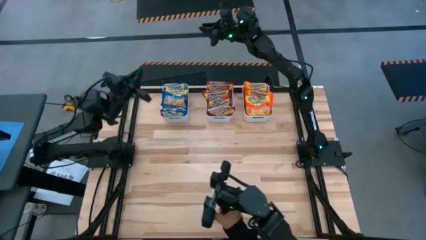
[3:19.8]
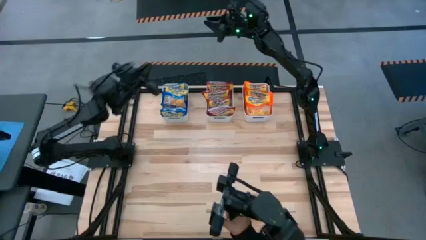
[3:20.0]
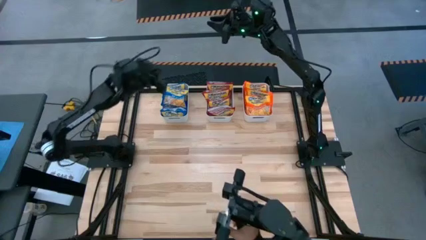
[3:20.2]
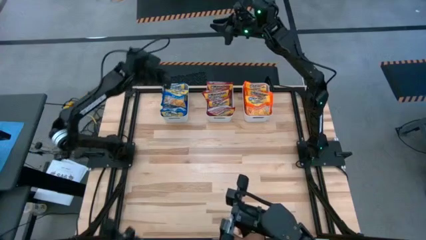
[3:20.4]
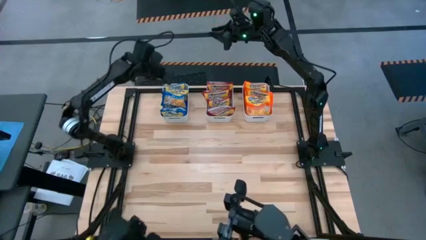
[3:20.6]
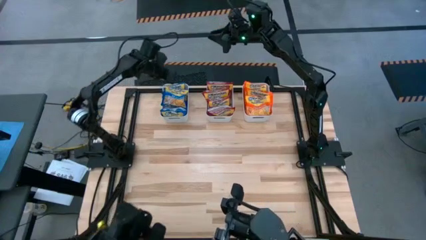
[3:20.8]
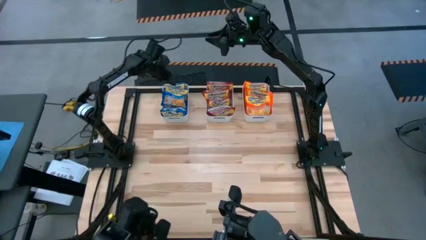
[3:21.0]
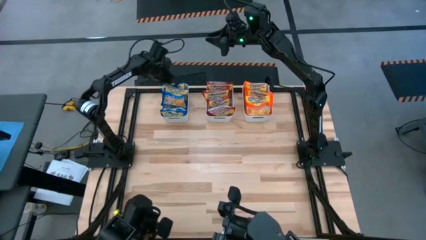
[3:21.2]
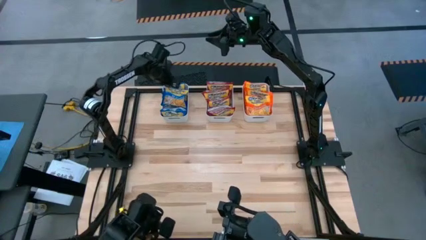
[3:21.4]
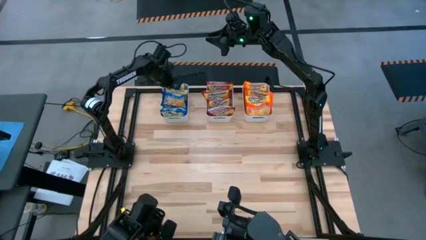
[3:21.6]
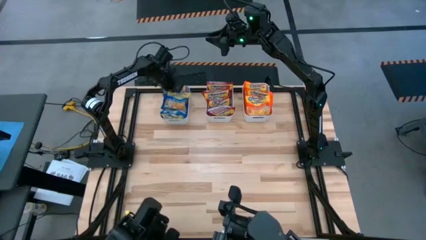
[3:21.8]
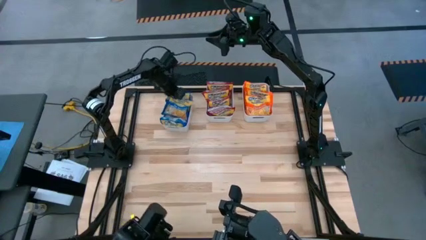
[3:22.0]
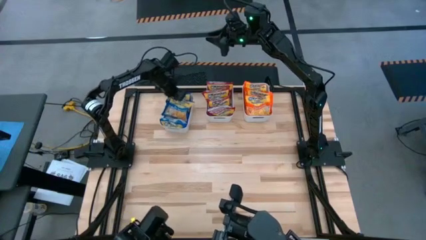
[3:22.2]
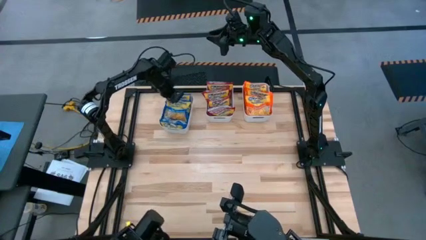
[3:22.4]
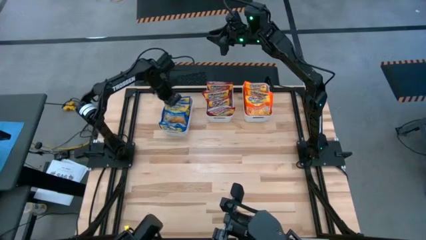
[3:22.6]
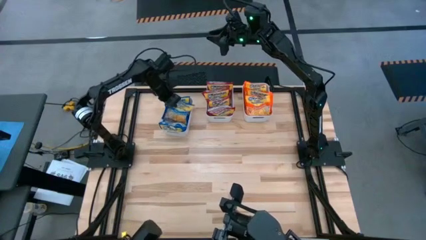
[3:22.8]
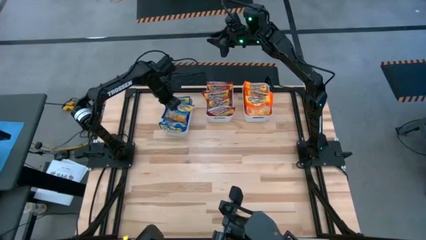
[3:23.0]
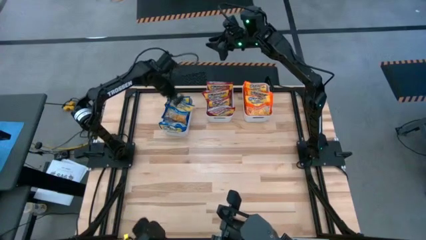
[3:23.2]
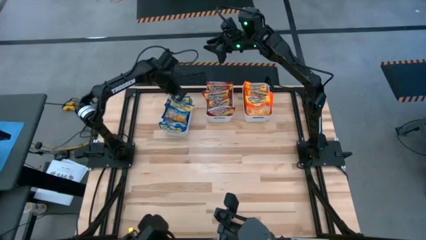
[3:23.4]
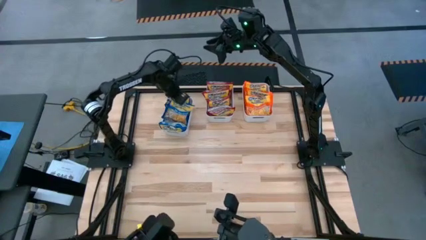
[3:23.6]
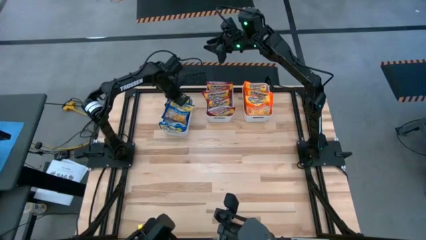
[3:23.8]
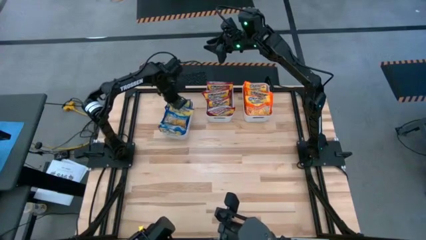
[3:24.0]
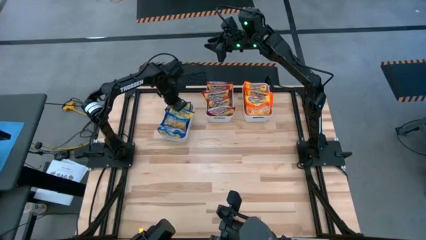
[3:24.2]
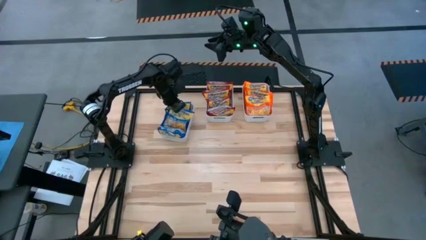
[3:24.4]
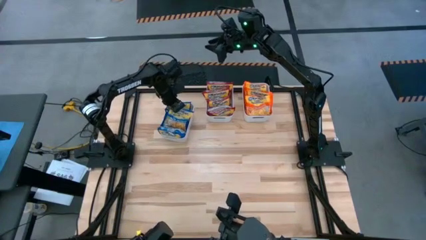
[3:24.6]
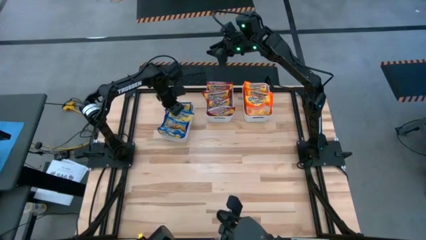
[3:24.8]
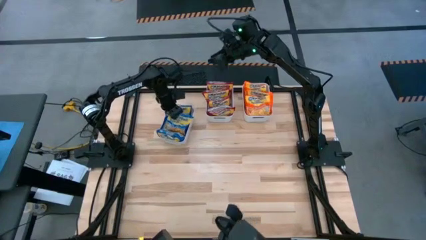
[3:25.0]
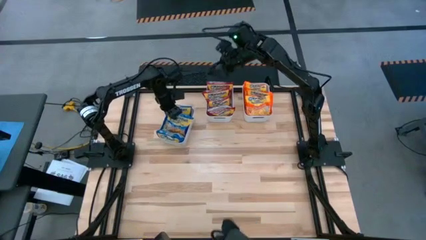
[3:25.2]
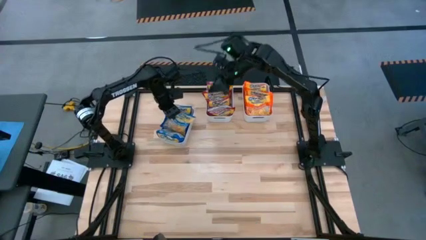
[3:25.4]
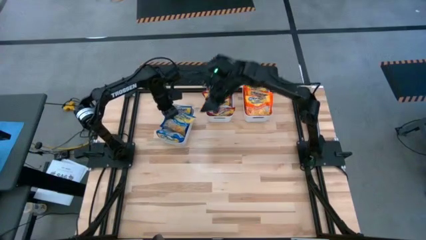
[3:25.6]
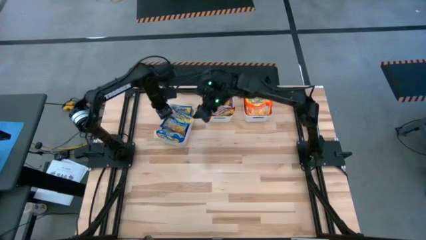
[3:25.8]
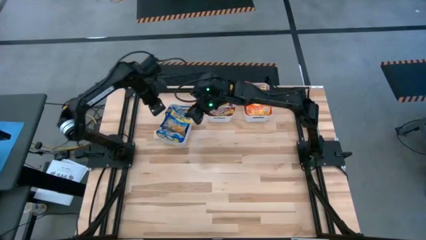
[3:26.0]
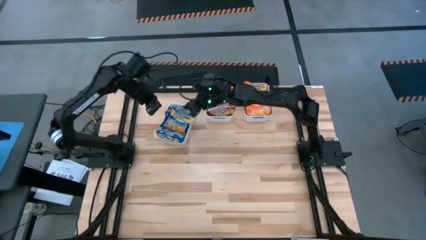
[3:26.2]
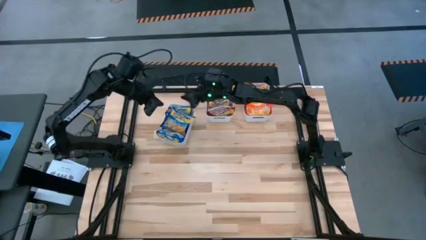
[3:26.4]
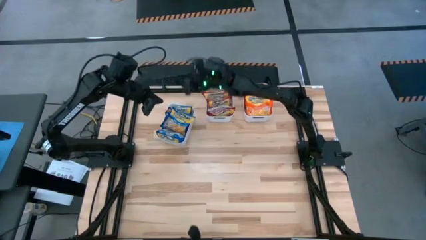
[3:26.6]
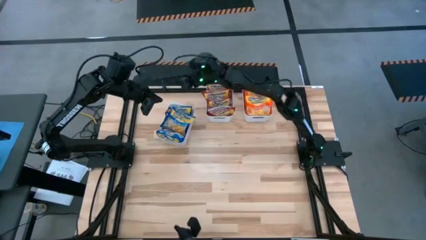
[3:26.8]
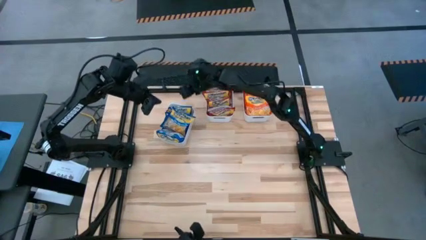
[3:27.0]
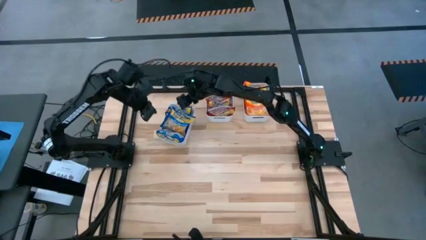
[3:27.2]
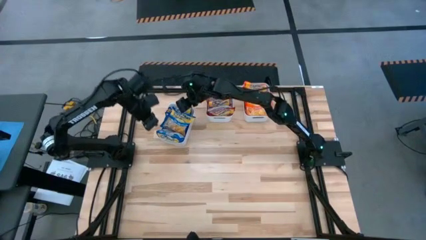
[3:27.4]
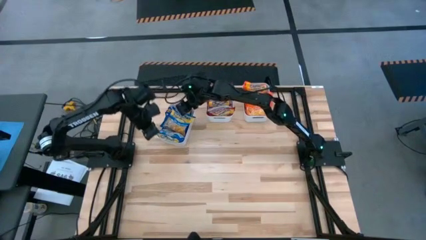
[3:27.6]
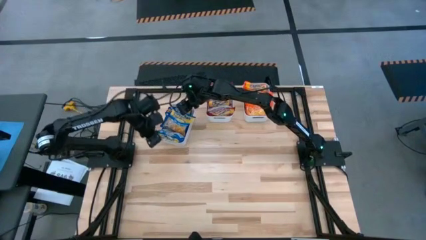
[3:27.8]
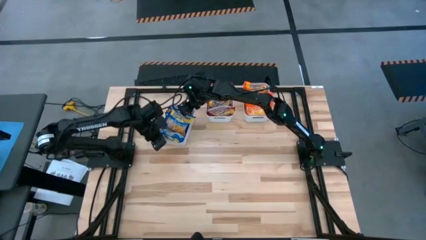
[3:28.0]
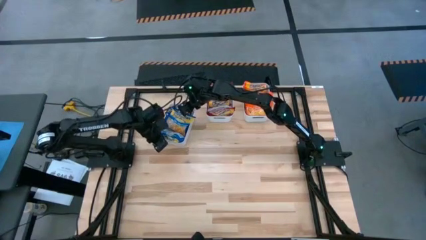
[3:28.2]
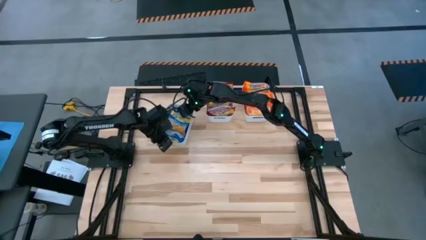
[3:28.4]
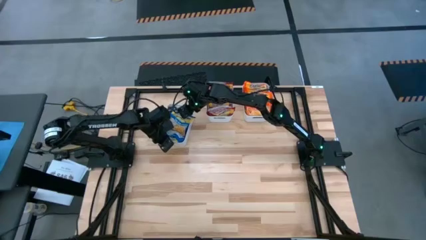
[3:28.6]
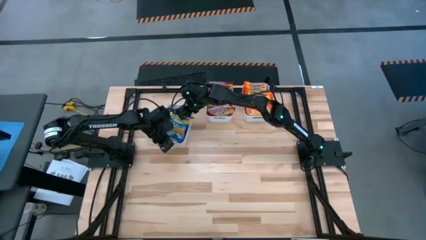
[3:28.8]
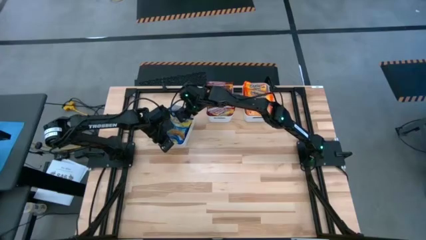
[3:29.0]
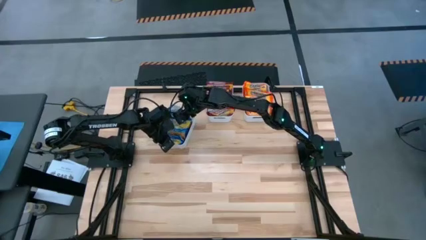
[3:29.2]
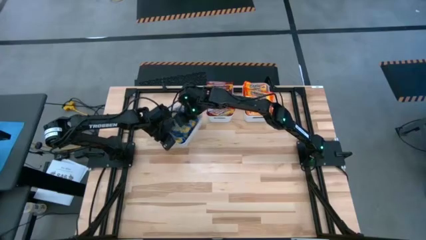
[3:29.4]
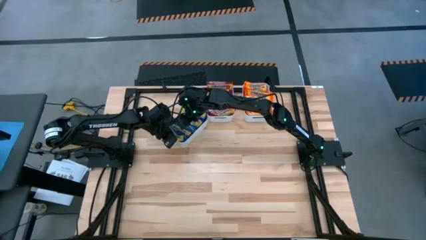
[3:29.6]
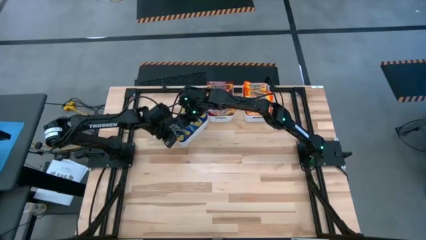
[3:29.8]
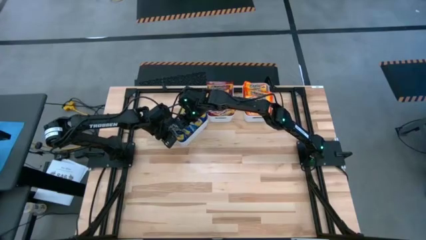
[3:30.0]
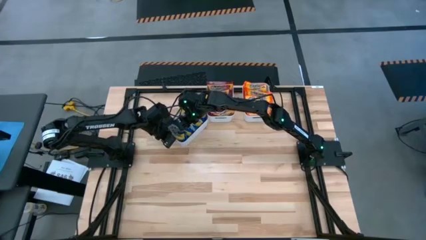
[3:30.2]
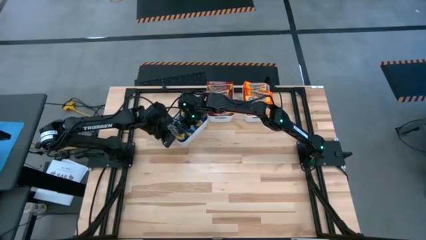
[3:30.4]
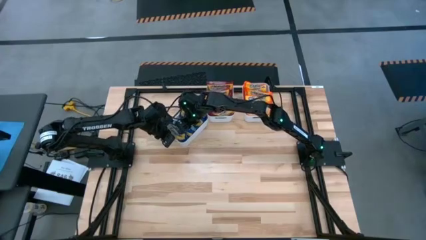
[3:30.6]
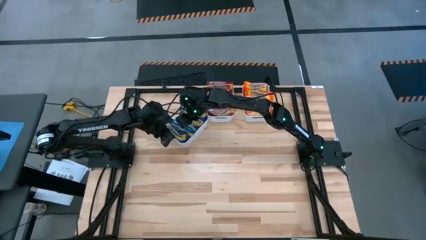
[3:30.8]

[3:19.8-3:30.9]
Task: Sort Maruchan noodles
Put the blue noodle pack into the left white bin

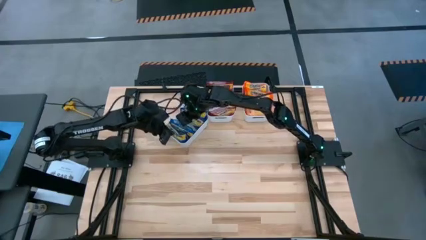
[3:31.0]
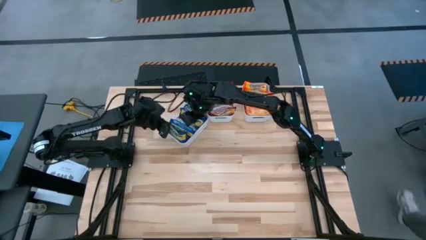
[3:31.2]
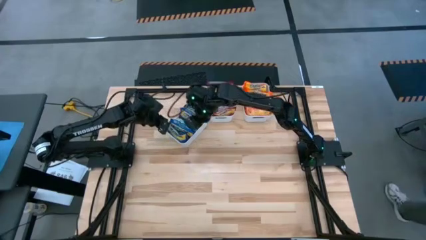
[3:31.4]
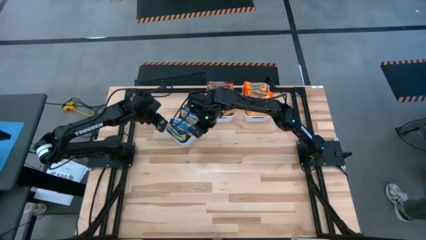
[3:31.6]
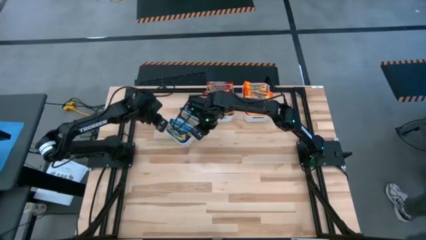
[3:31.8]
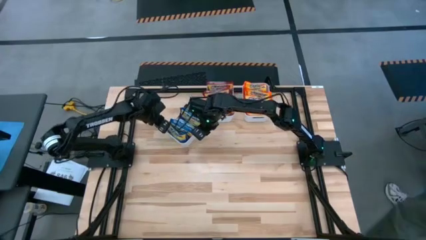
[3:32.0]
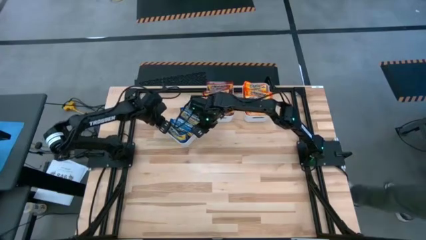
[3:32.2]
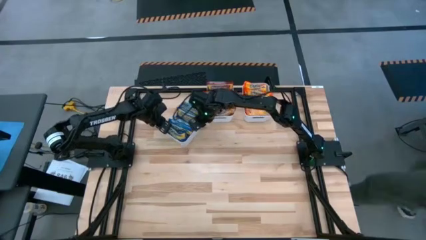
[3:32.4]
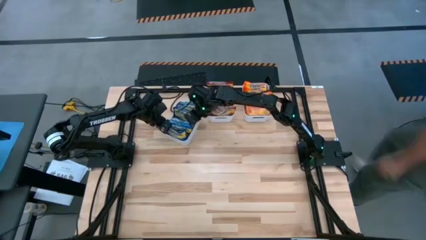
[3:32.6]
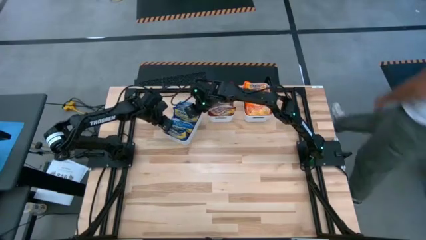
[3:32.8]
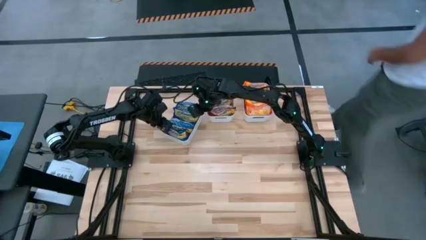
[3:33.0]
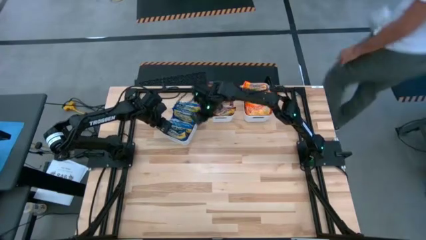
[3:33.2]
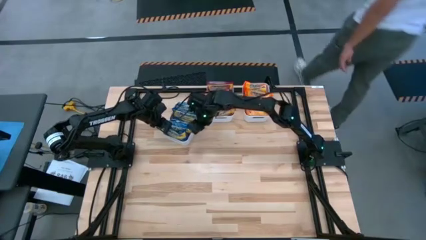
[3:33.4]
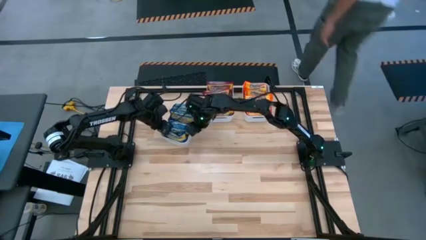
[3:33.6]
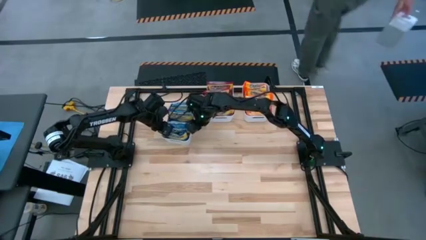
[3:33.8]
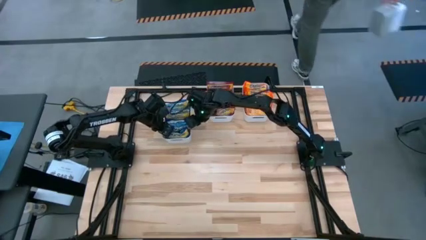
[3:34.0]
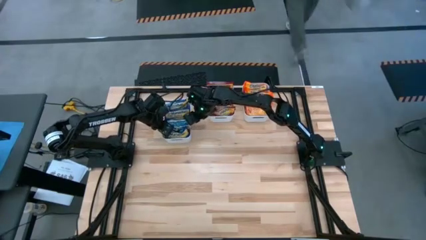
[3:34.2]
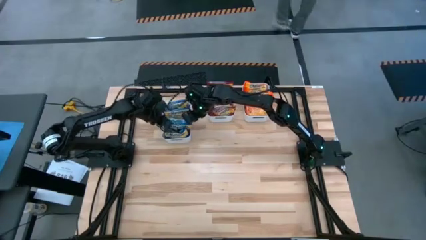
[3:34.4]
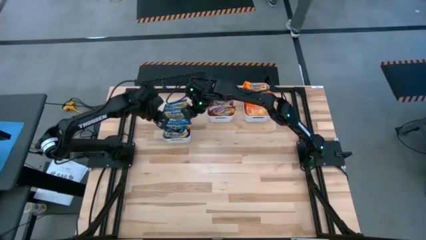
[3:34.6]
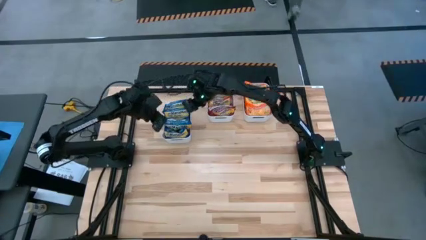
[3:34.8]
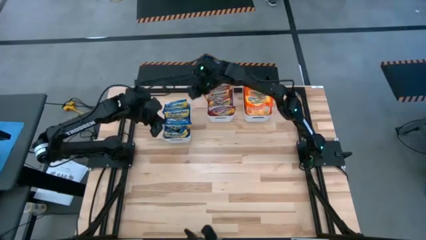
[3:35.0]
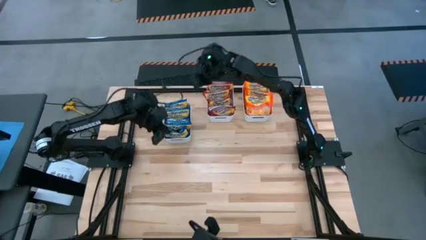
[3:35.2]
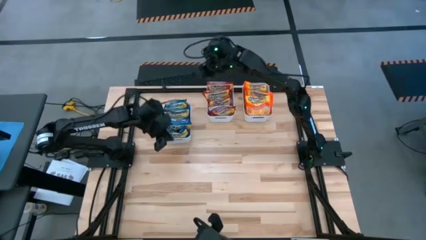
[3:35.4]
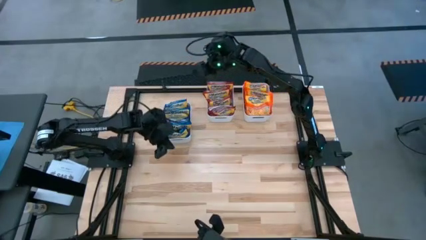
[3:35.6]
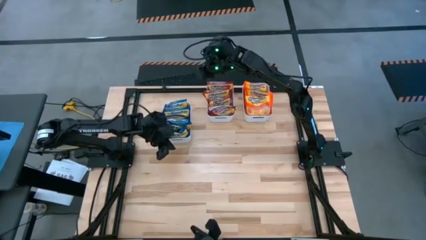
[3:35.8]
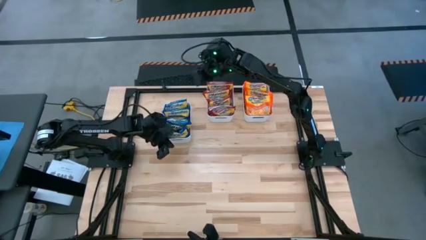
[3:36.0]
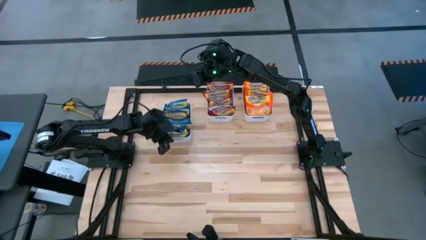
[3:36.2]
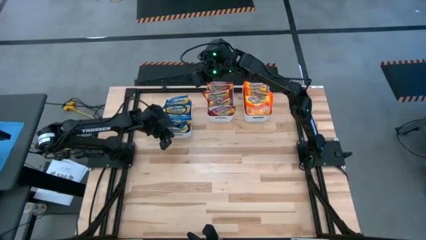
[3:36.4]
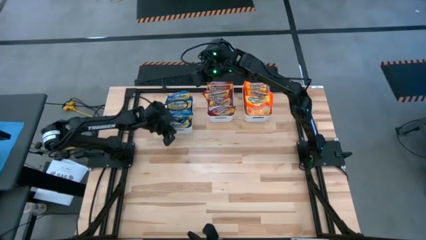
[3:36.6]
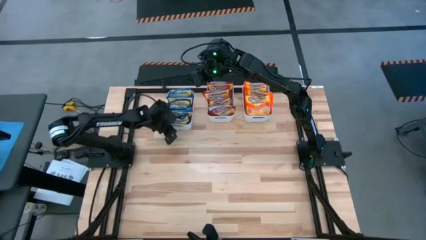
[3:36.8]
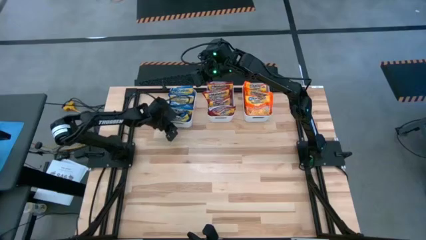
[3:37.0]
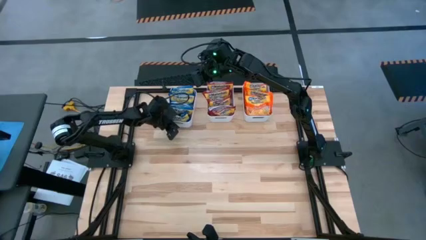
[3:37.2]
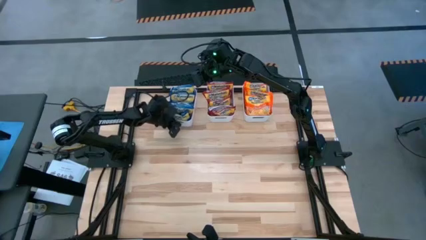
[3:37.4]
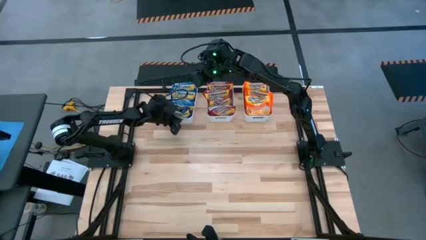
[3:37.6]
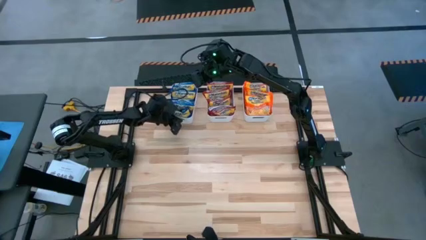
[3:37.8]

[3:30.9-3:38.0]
Adjust the left white bin
